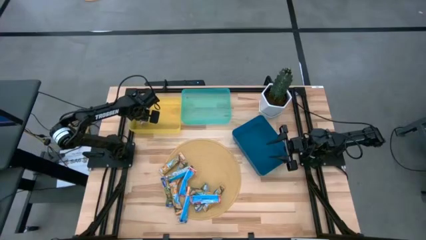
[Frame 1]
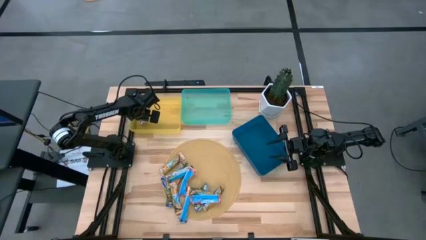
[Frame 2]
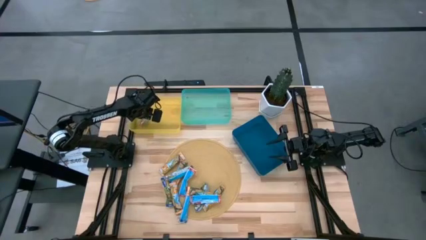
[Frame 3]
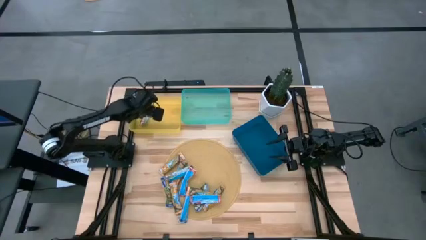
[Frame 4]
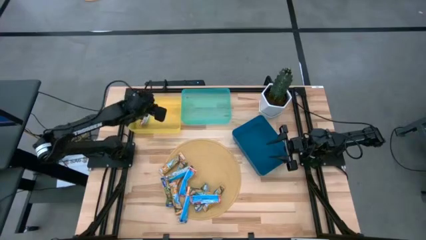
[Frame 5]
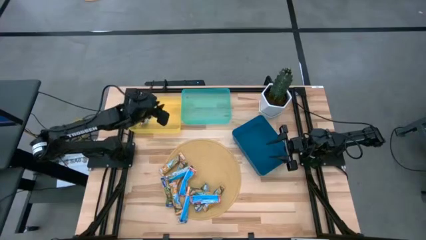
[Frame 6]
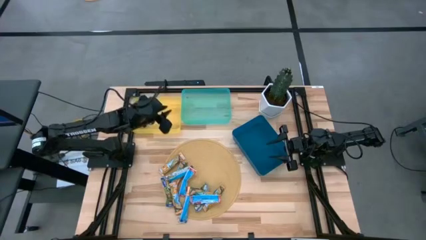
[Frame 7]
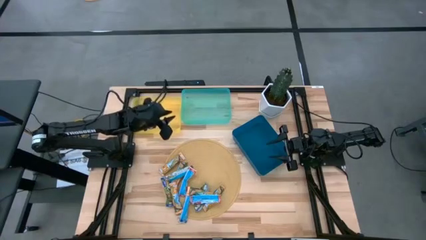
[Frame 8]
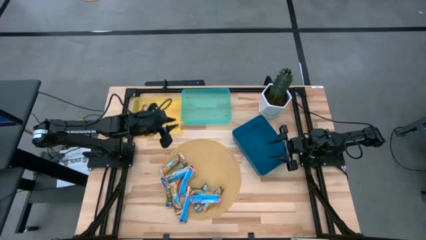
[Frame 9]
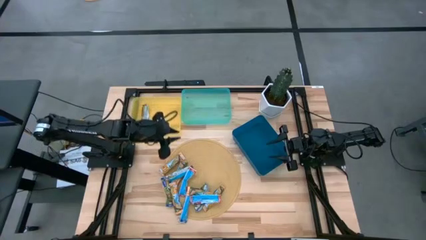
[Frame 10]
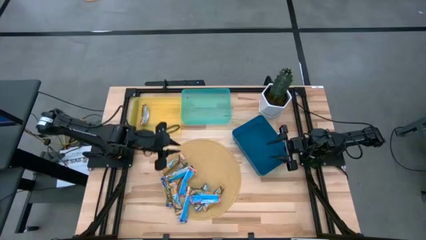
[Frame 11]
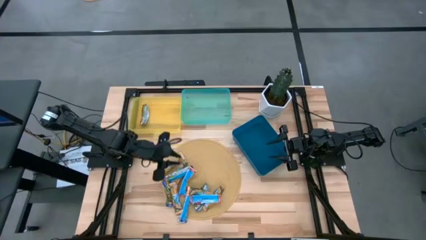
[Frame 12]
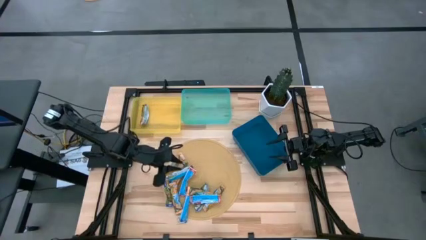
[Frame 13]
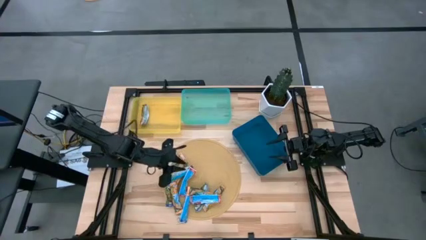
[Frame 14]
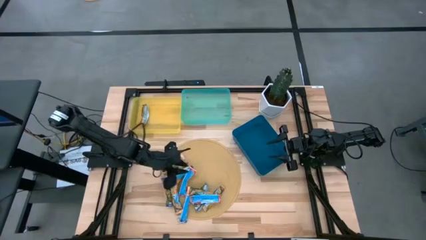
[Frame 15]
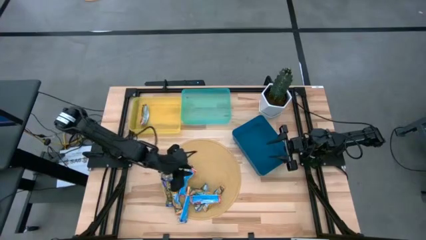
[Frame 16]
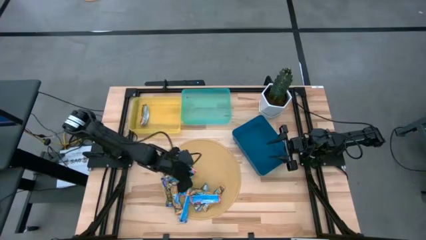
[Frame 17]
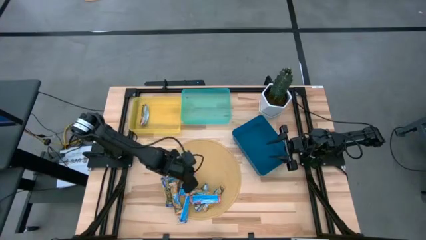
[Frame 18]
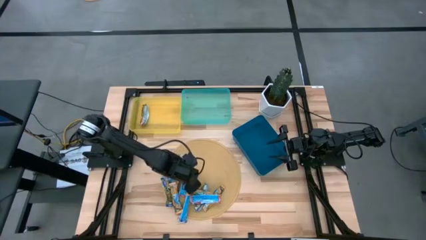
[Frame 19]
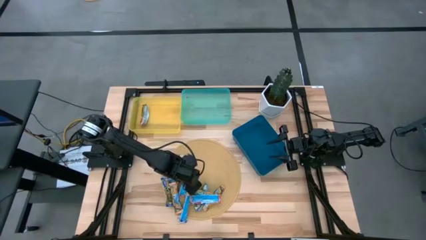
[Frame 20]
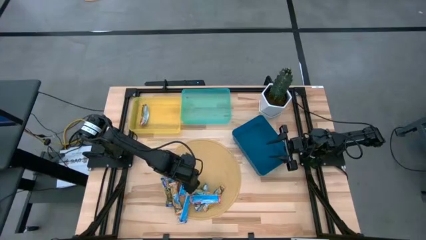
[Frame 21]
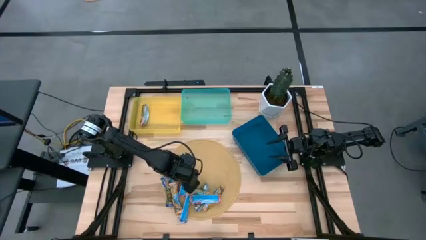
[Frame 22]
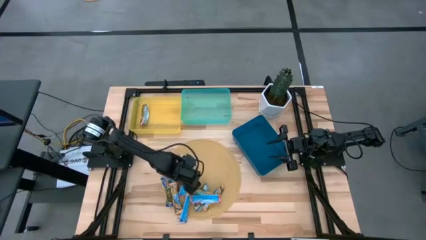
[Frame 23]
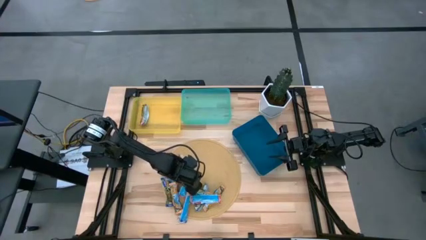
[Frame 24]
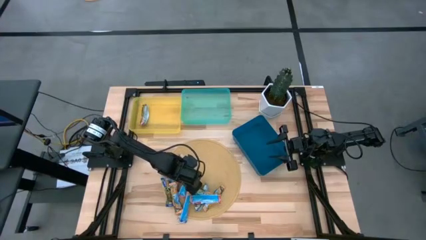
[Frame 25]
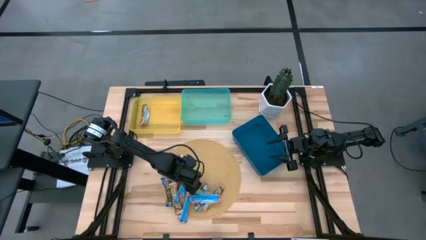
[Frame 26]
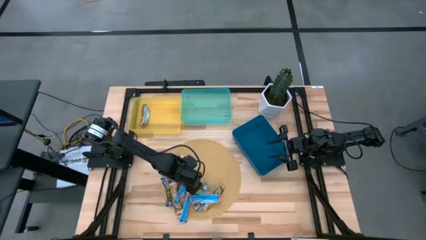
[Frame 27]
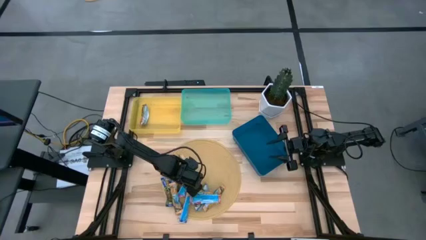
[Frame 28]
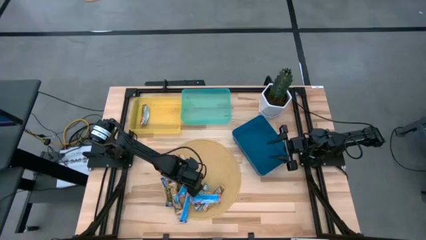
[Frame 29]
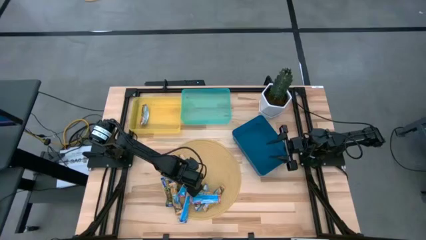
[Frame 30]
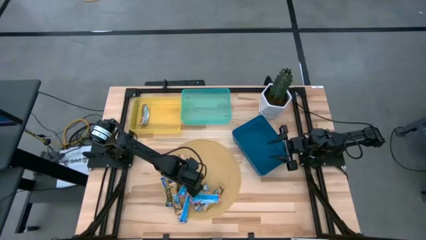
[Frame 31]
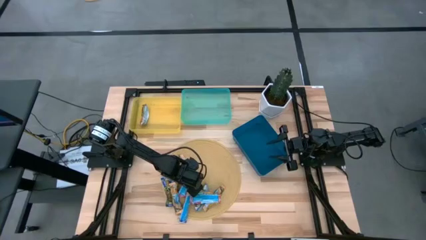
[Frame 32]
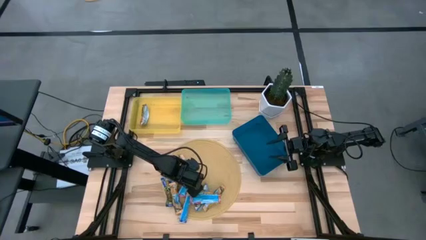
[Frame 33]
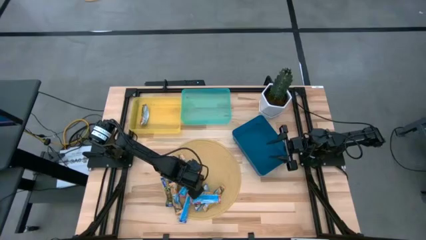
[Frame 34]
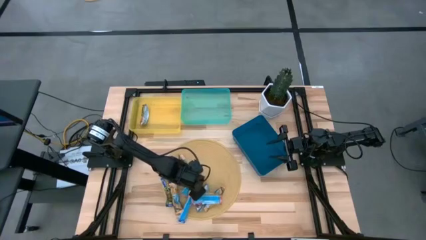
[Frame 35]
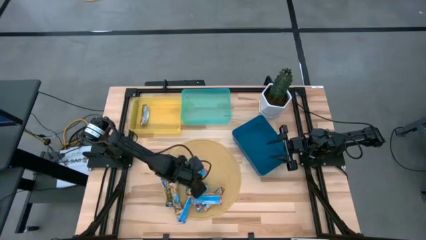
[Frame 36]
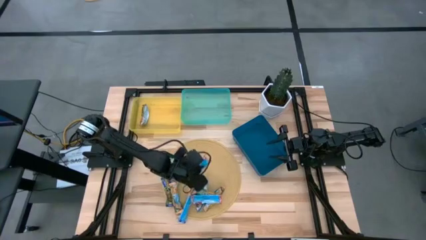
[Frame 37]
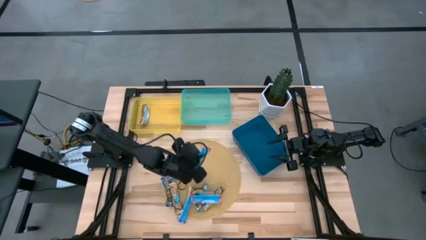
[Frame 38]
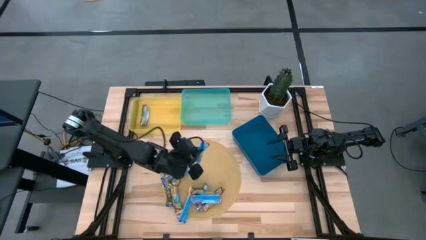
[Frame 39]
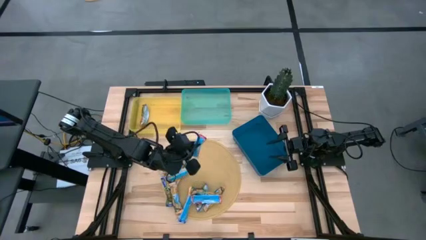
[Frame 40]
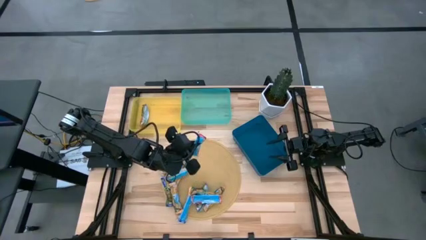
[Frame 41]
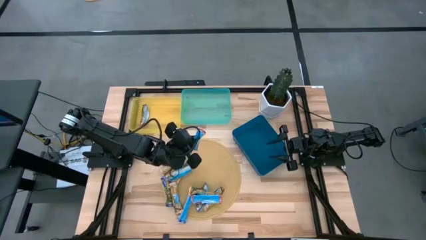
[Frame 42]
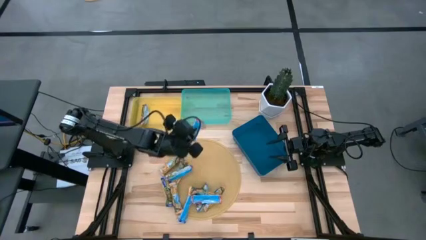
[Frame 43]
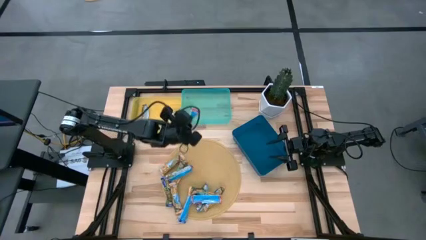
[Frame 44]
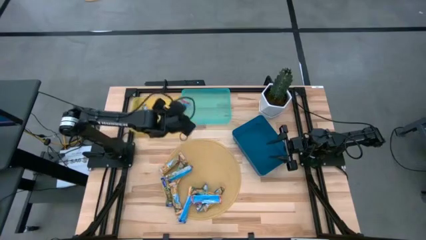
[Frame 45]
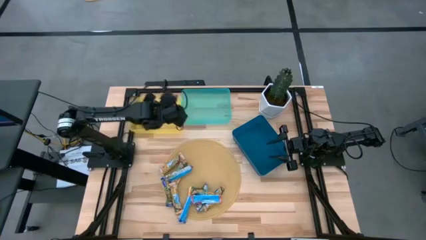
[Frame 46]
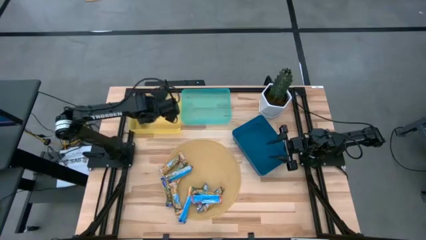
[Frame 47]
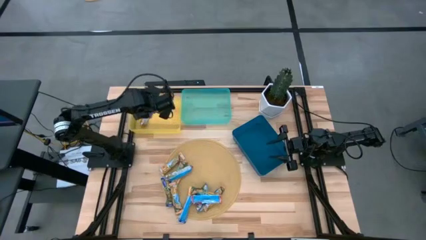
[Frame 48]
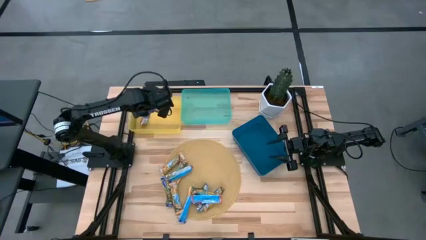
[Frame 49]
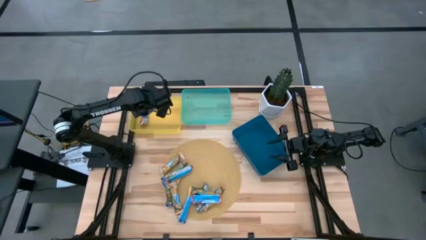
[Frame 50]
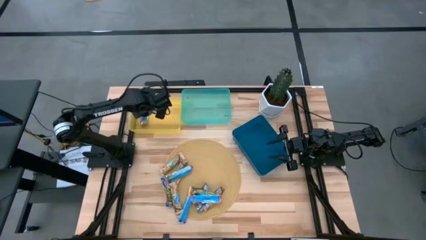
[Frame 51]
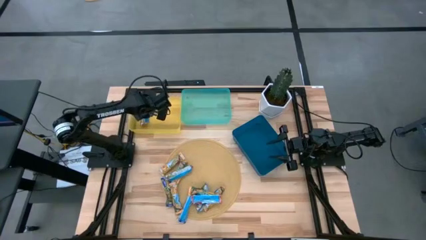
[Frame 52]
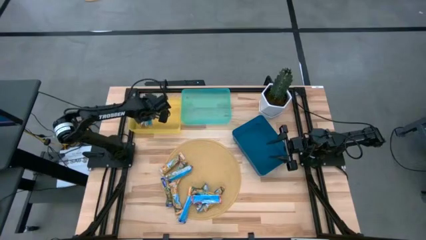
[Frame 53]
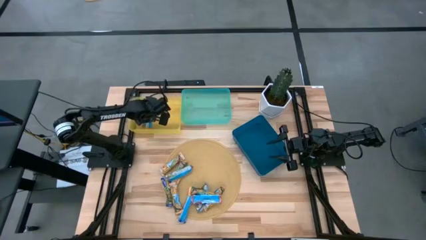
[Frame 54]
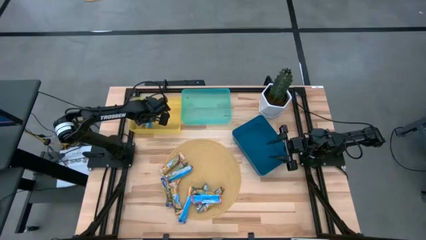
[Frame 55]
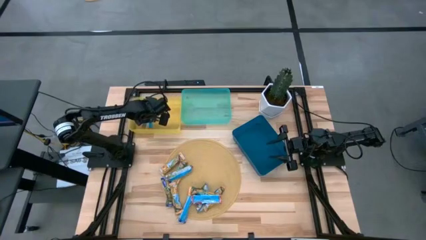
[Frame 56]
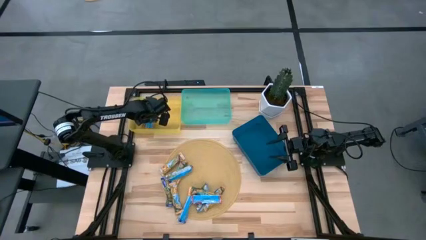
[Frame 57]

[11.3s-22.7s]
Task: Pick and place Granola Bars by type
Put the middle red granola bar into the yellow bin
